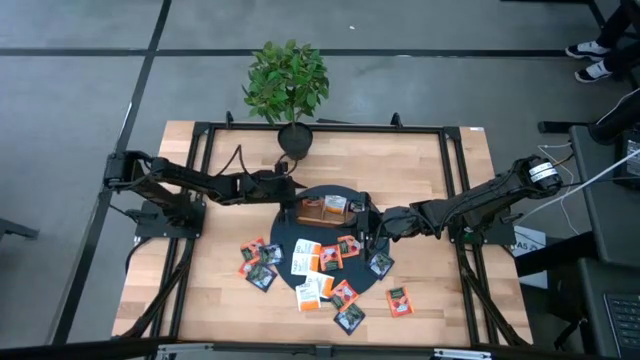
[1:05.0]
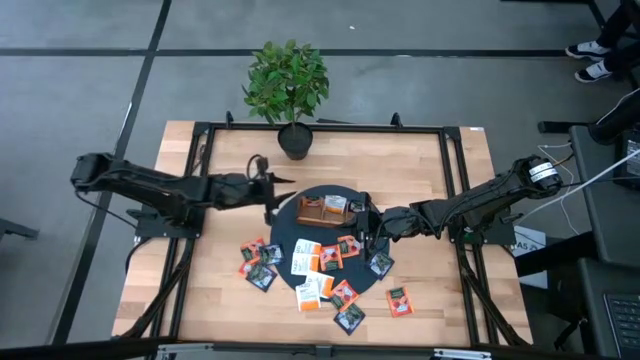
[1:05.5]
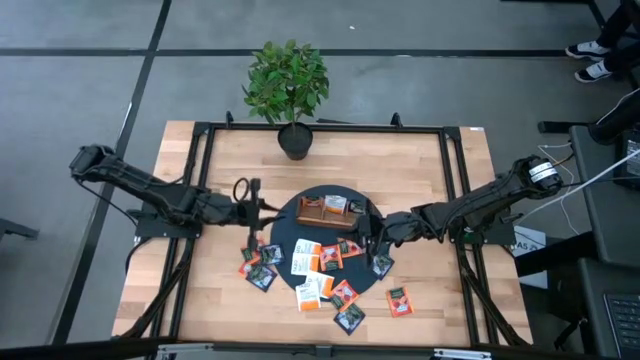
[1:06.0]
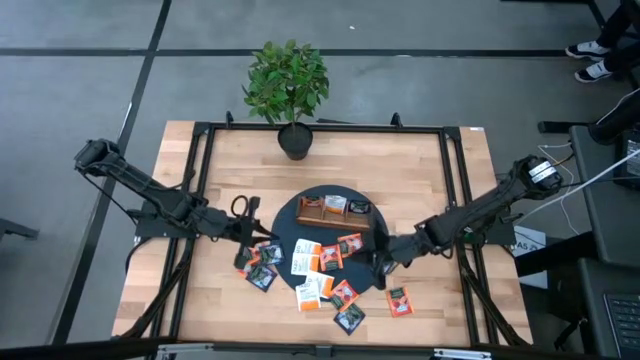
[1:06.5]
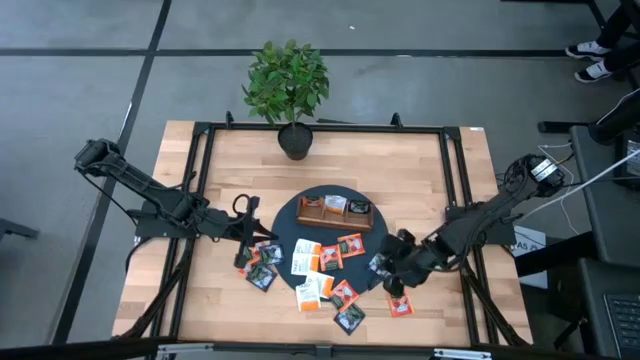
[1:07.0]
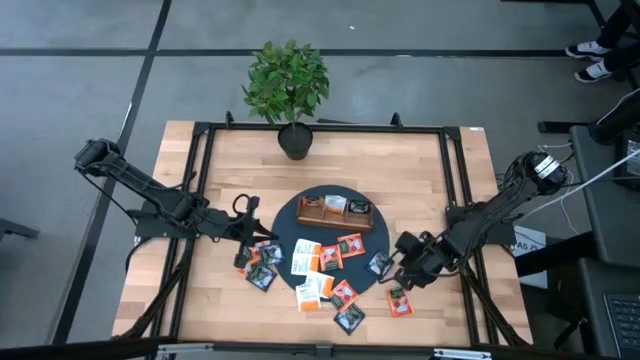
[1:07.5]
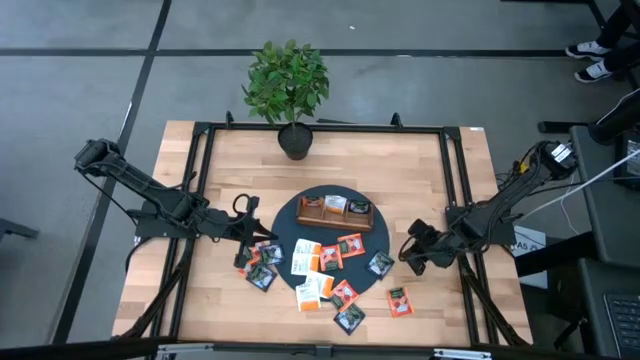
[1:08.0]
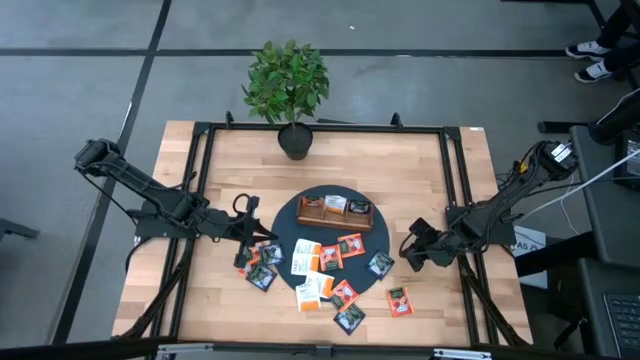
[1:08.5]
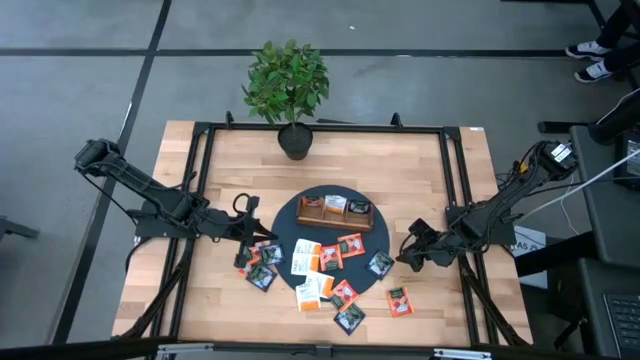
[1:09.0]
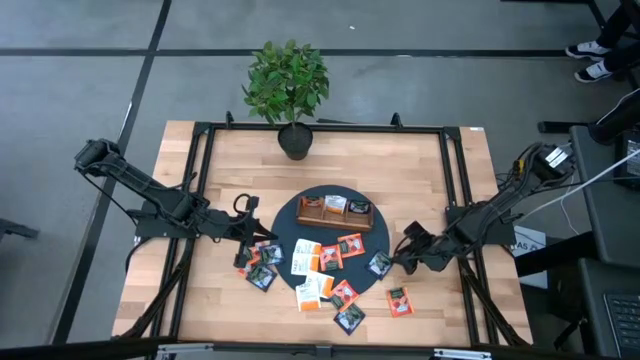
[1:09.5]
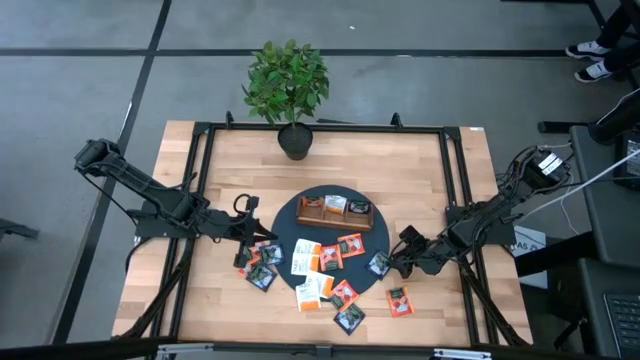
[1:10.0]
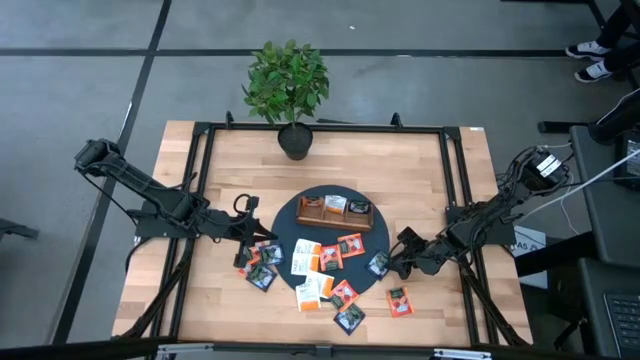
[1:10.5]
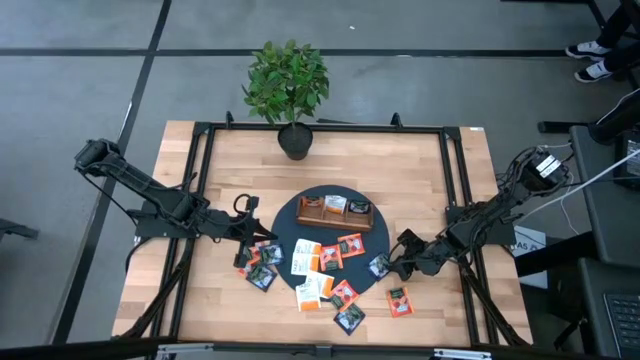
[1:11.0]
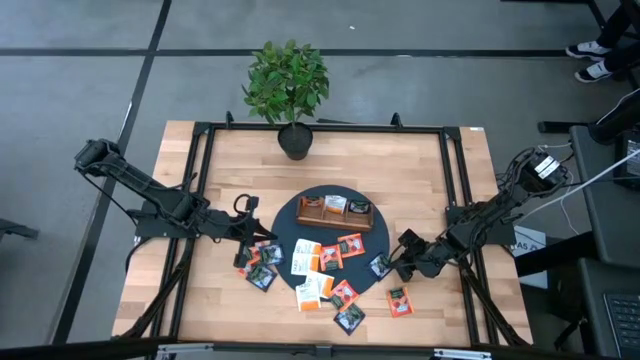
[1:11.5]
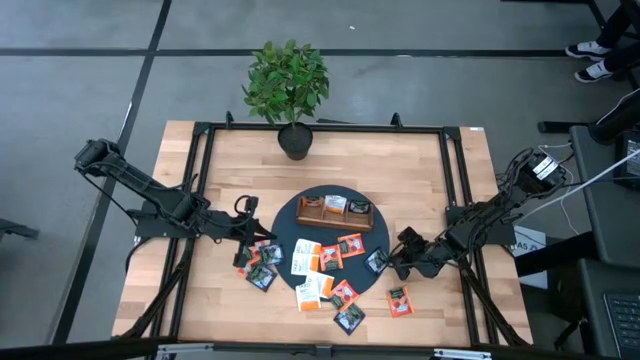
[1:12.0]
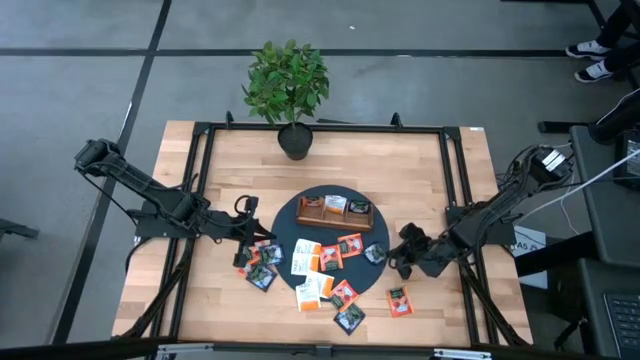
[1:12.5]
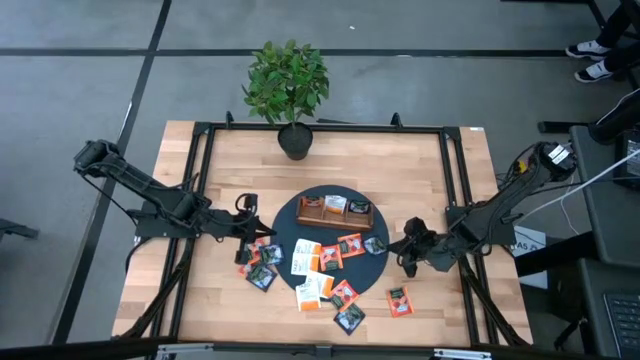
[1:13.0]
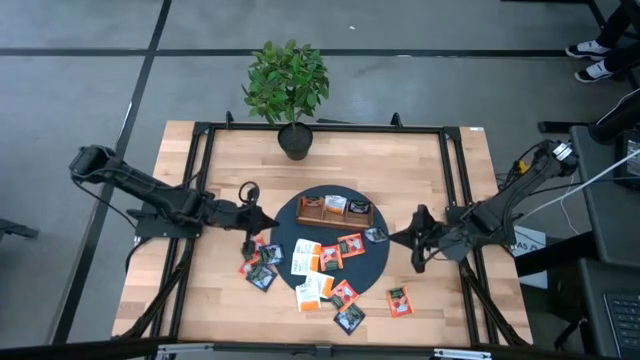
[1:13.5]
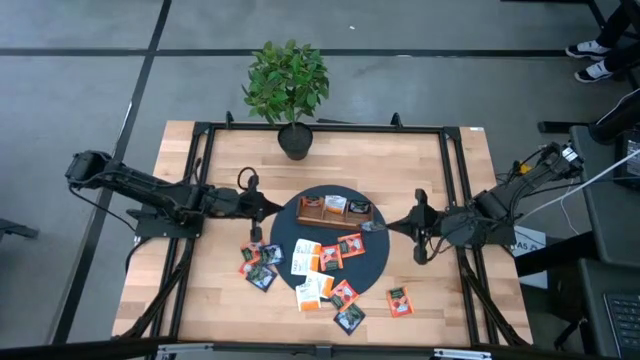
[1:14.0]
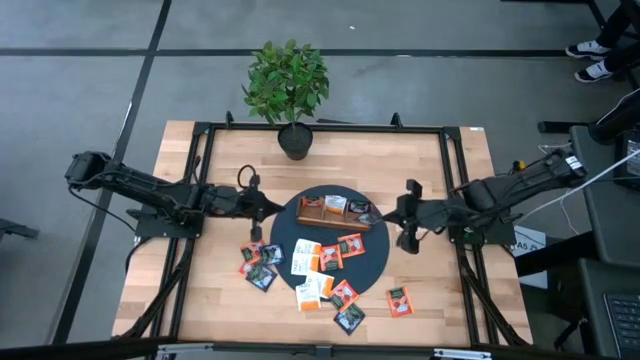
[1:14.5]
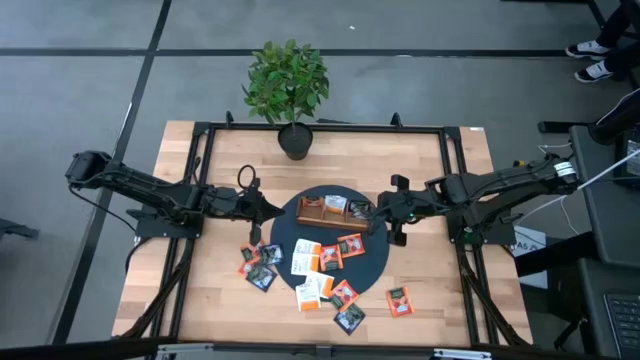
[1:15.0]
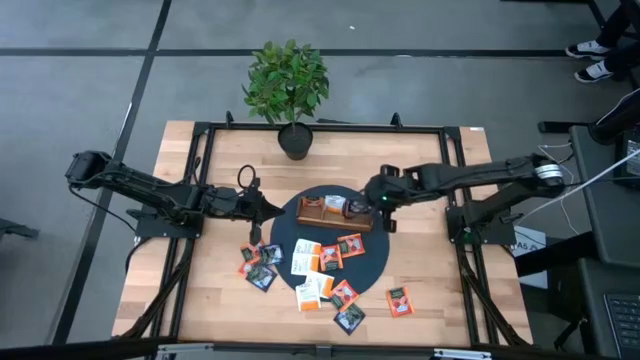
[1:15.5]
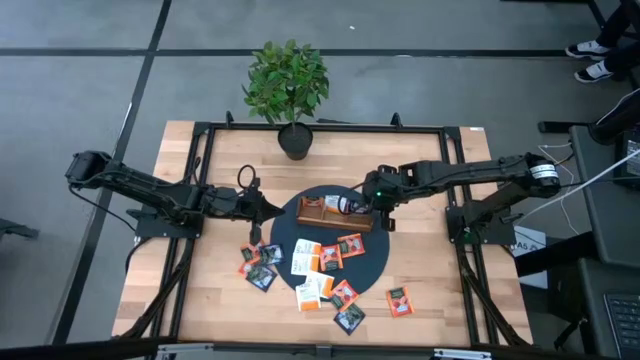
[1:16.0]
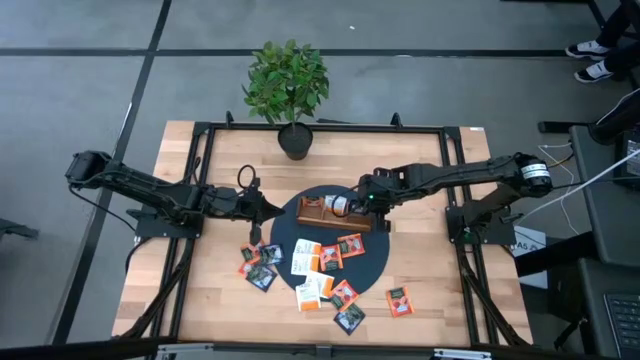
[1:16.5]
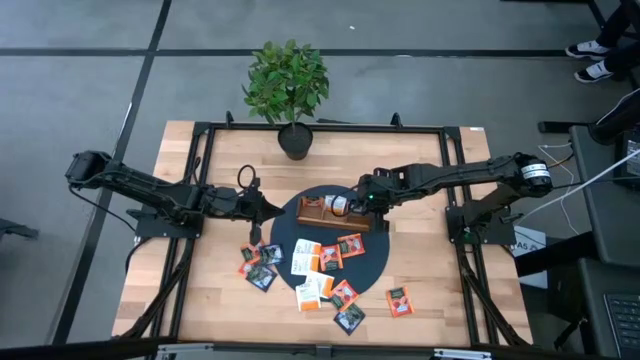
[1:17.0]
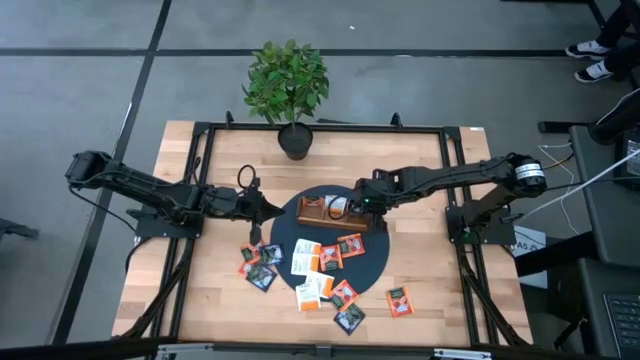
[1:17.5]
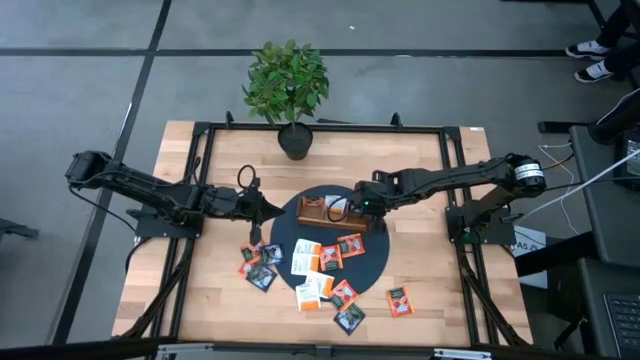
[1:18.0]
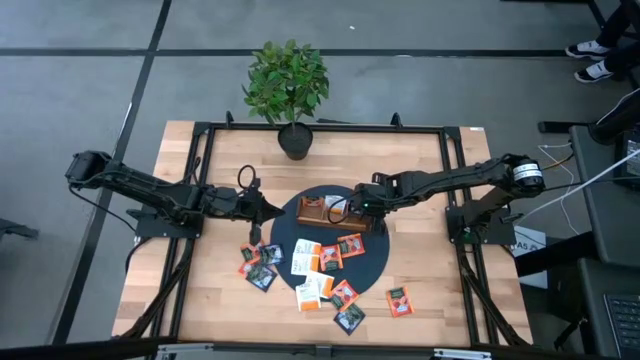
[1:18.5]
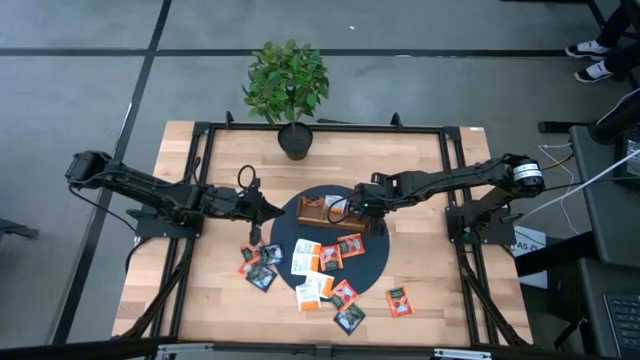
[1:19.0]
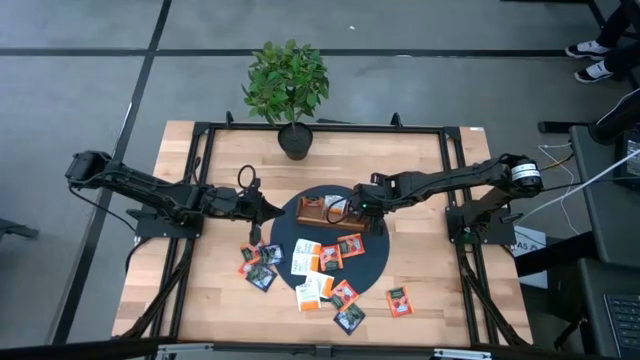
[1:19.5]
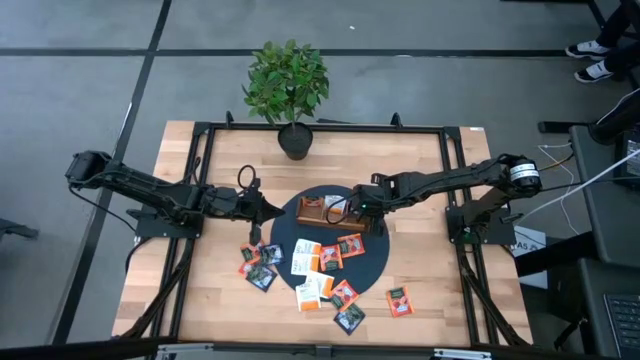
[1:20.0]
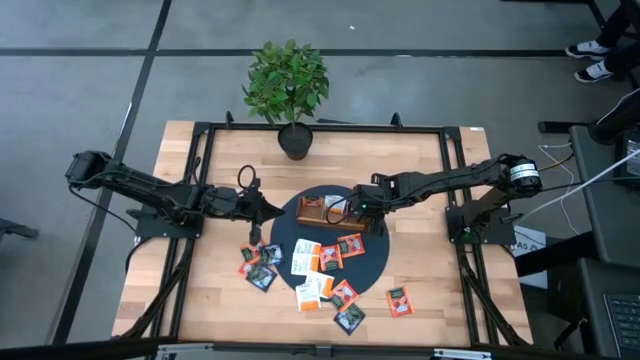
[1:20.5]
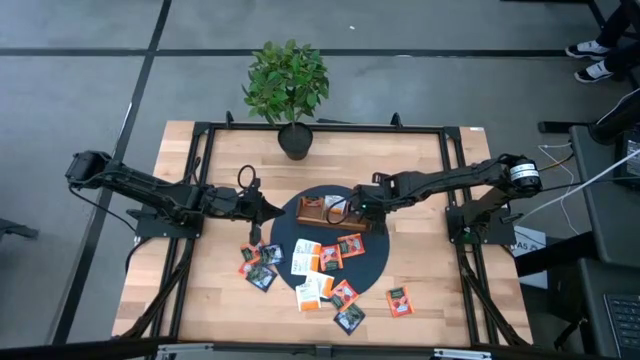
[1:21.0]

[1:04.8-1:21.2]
Task: Pick & Place Tea
Put the violet tea bag into the right side of the wooden organizer

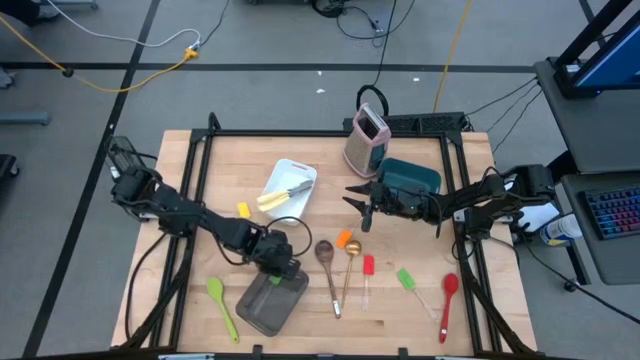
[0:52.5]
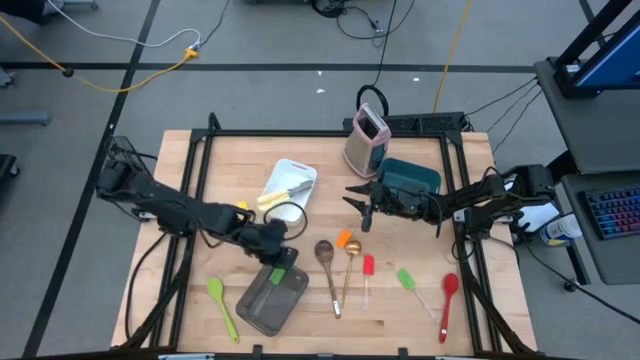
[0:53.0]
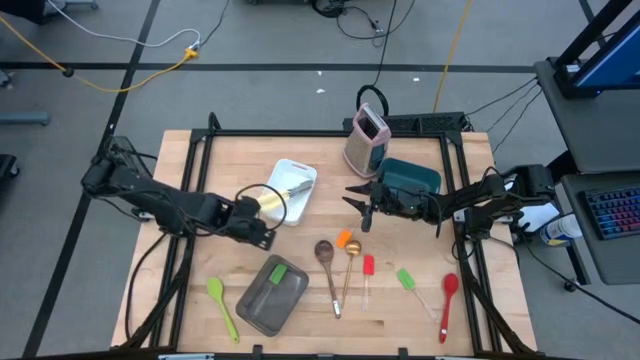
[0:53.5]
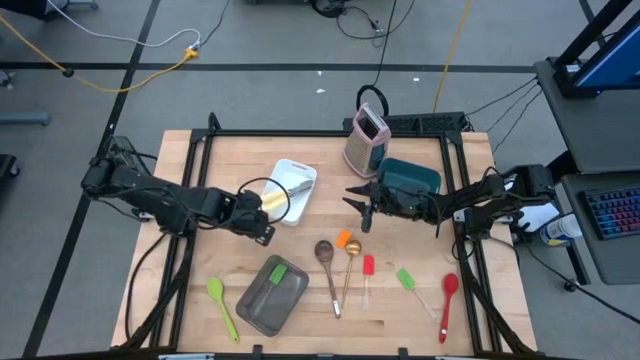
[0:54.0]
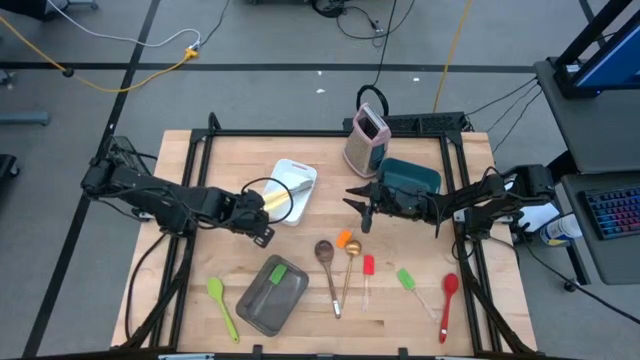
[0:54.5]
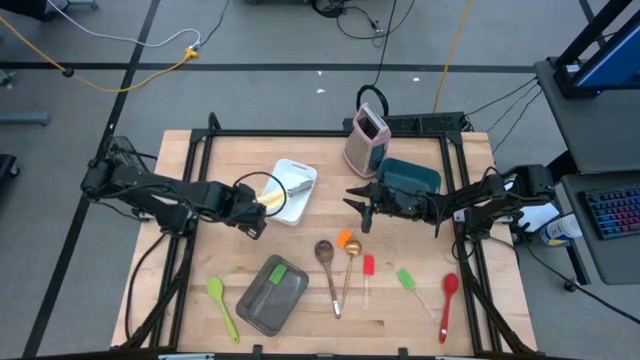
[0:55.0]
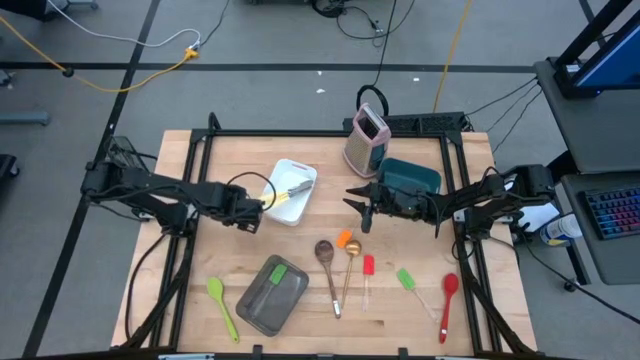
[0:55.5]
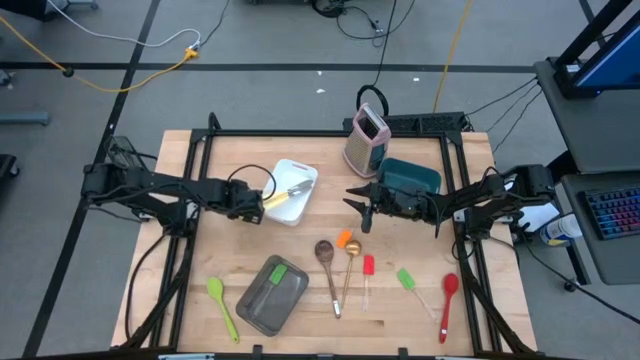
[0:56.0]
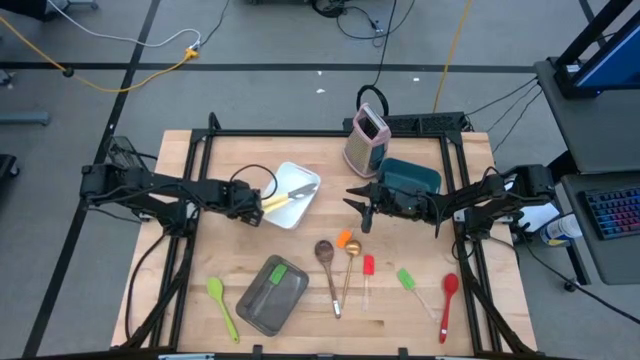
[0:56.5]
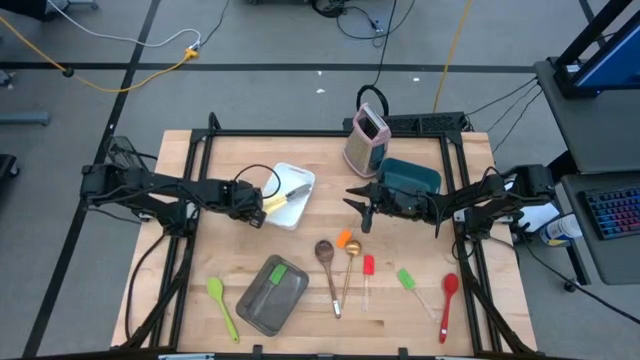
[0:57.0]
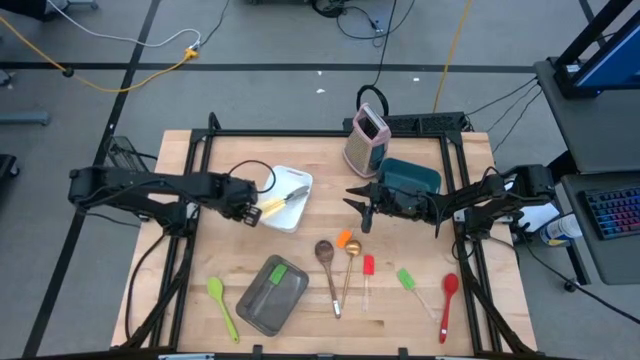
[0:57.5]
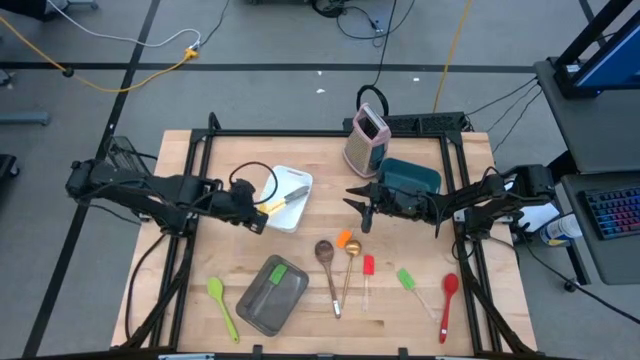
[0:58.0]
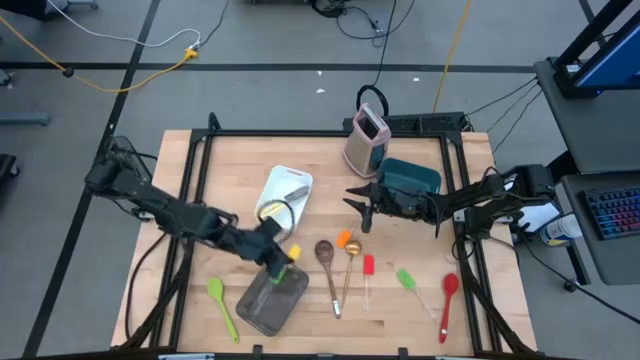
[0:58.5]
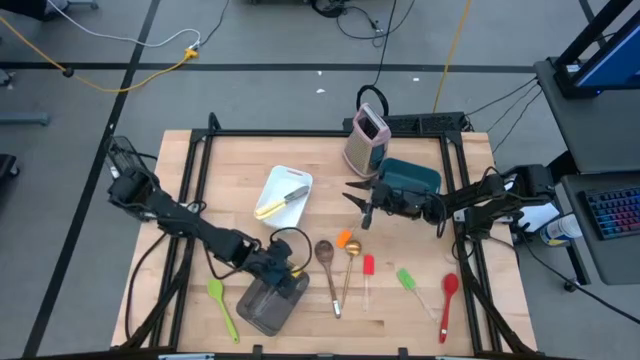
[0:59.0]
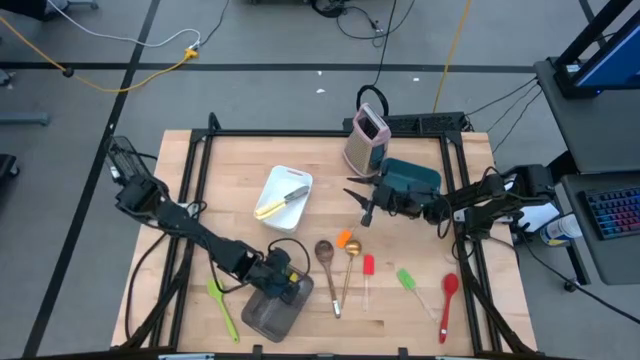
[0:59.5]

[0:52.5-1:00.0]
Task: Pick & Place Kitchen Items
Put the yellow spatula into the black bin
